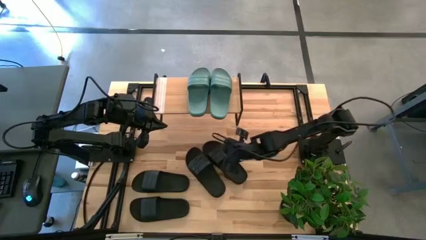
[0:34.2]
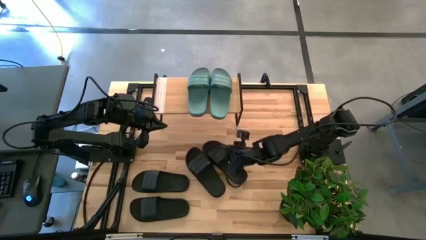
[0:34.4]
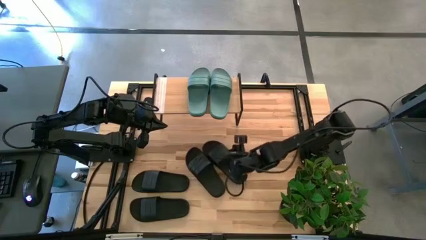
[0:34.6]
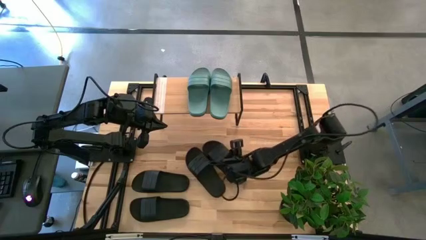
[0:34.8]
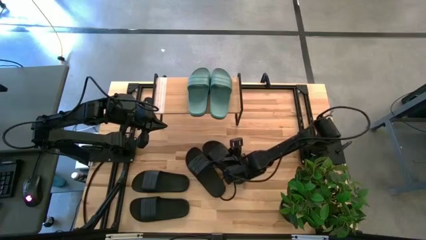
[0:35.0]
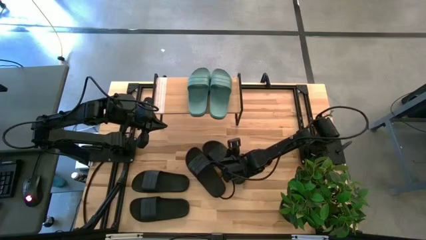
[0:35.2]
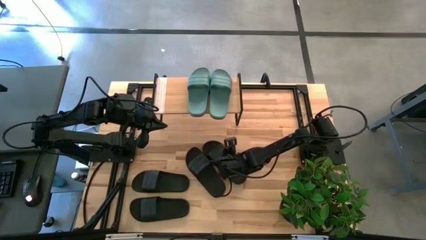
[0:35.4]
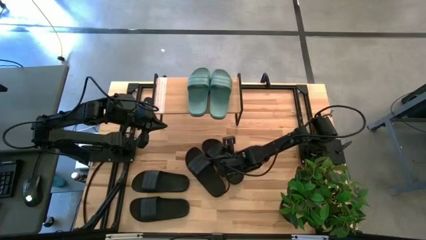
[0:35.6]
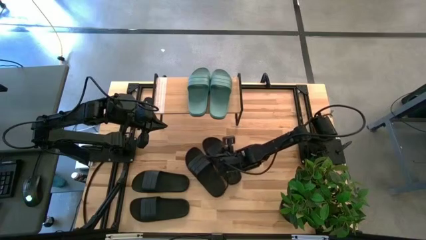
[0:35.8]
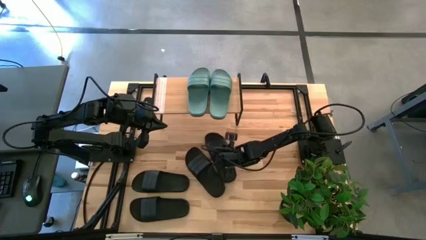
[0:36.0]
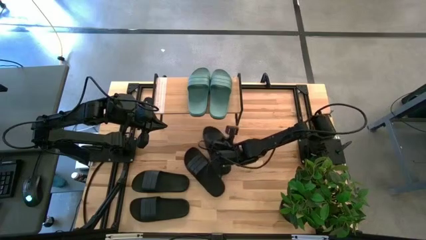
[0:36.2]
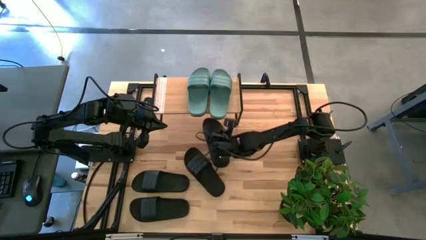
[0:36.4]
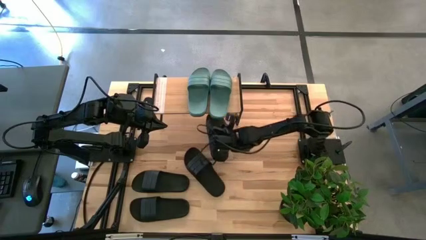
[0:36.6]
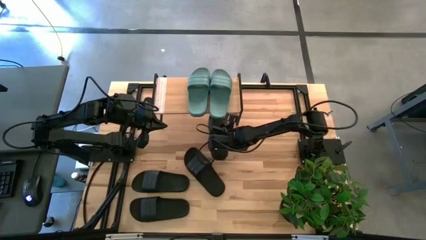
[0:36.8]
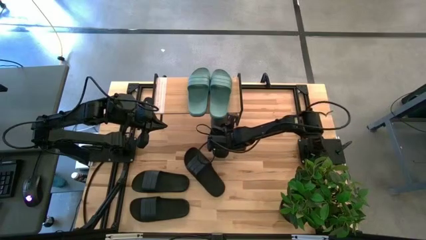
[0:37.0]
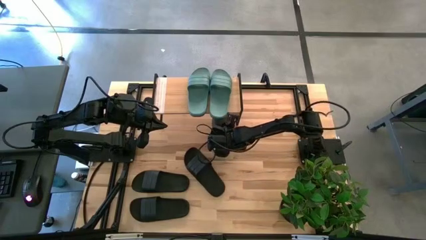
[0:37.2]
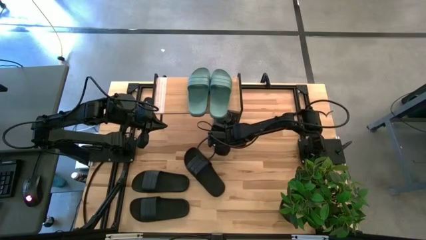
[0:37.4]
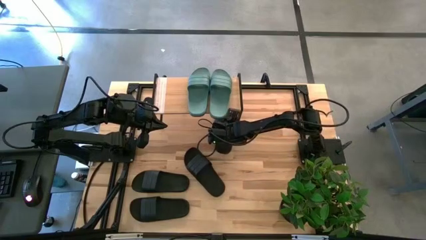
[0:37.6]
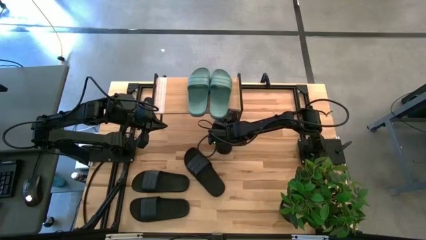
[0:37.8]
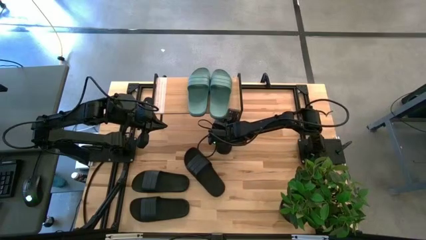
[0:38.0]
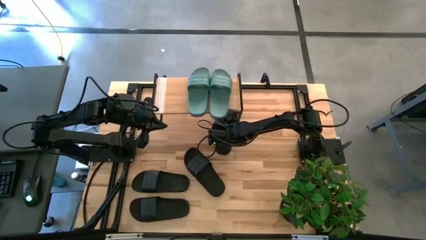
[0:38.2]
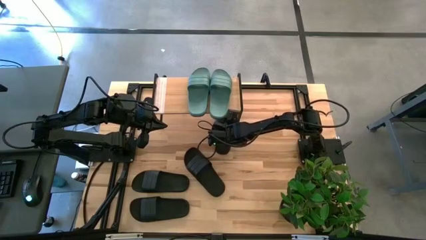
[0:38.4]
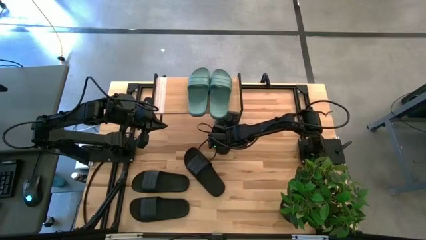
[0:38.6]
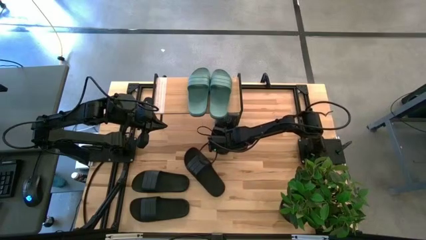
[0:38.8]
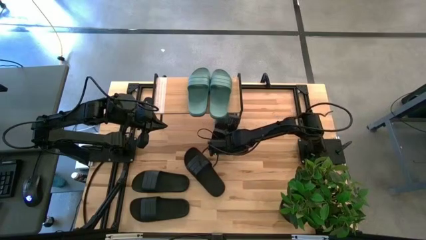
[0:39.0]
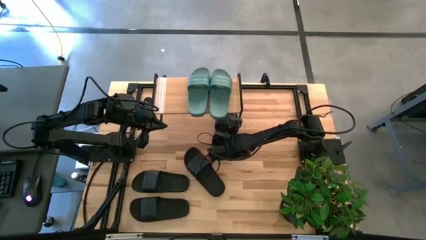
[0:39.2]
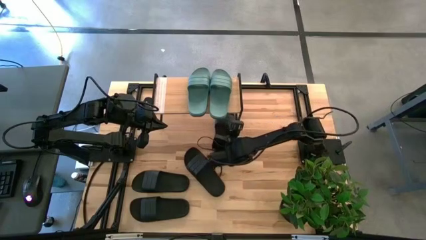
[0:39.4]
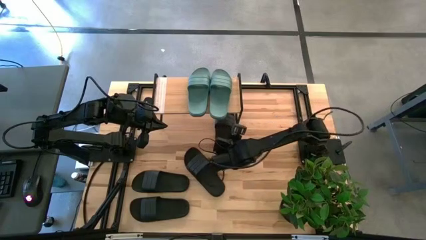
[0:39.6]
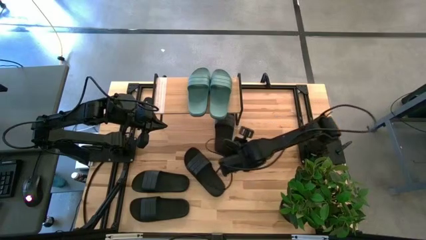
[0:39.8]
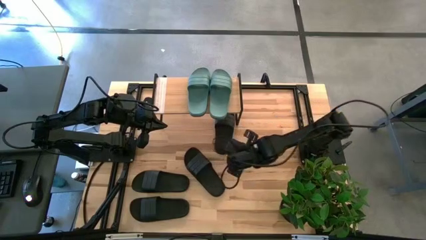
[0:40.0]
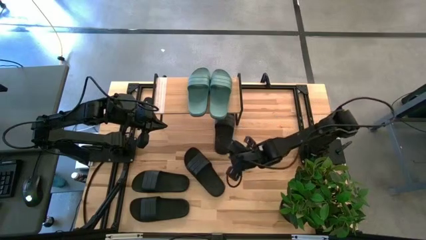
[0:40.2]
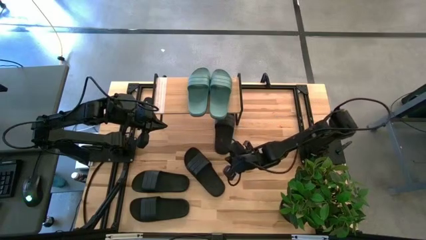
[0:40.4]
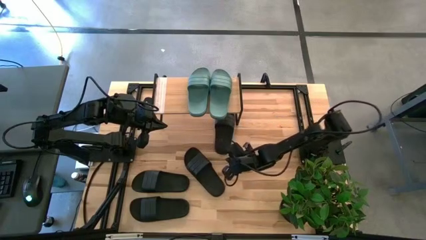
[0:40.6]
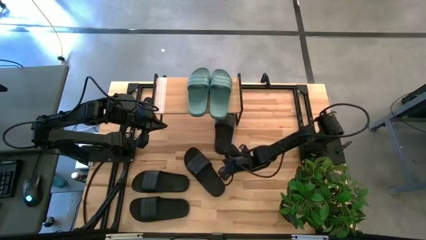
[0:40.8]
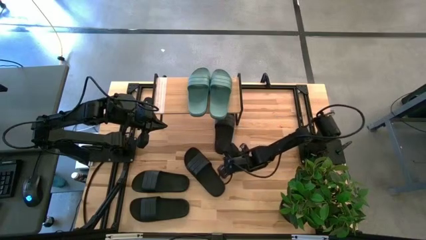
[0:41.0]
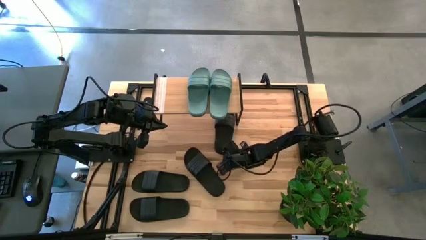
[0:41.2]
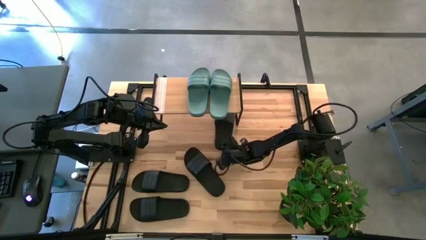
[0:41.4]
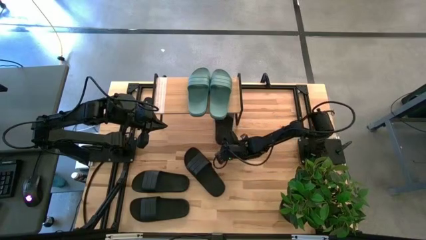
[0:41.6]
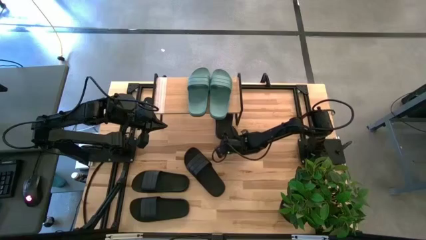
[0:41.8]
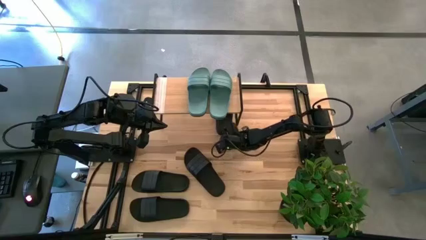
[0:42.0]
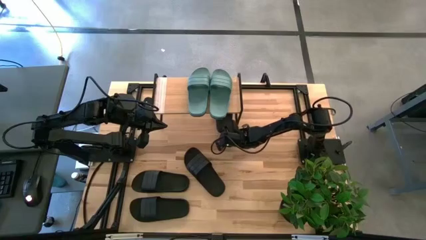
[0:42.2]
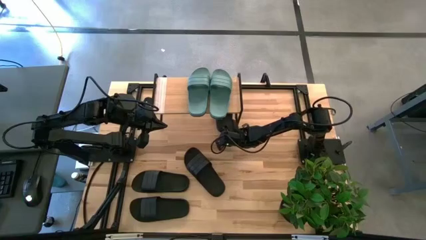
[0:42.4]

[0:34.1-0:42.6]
Task: Pick and place slides into the shelf
Put the black slide under the shelf
